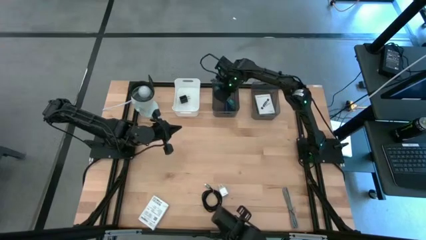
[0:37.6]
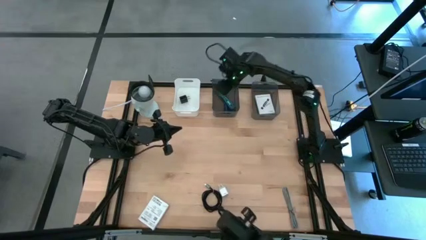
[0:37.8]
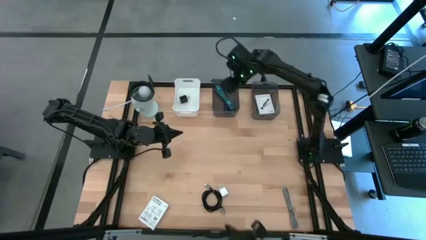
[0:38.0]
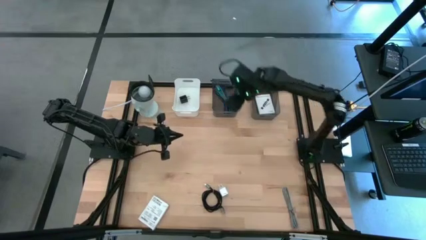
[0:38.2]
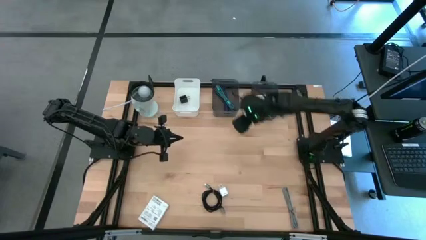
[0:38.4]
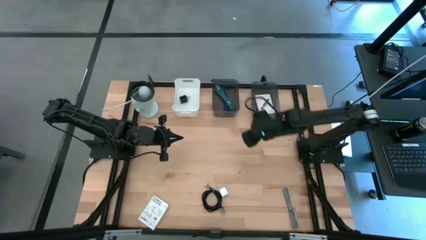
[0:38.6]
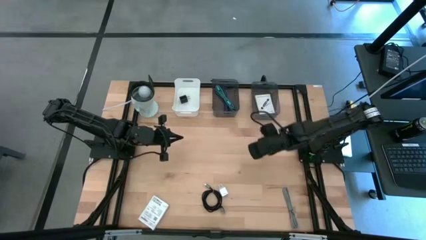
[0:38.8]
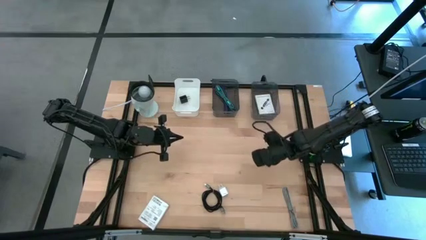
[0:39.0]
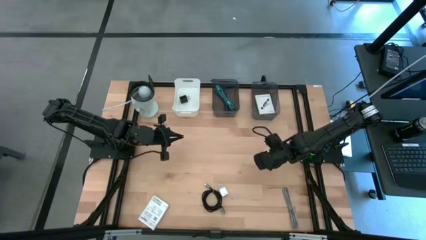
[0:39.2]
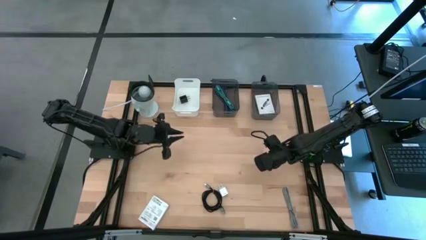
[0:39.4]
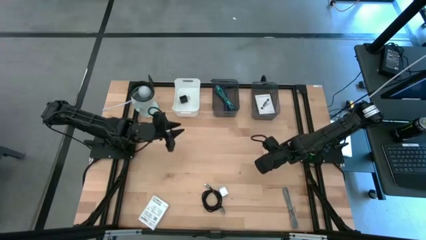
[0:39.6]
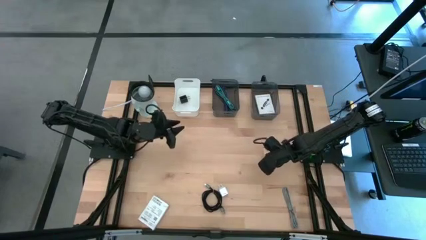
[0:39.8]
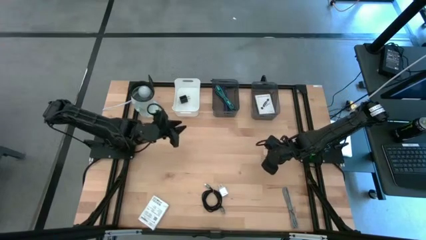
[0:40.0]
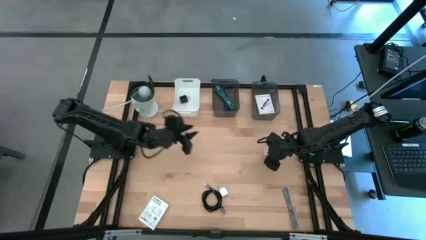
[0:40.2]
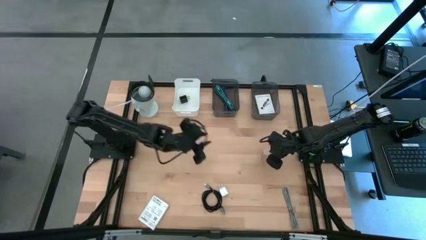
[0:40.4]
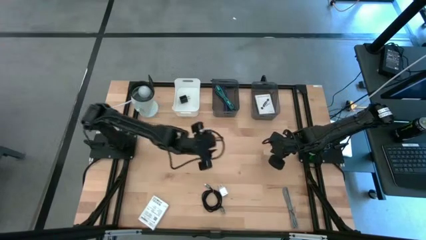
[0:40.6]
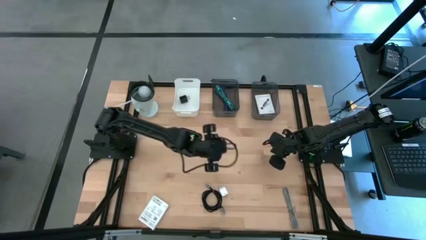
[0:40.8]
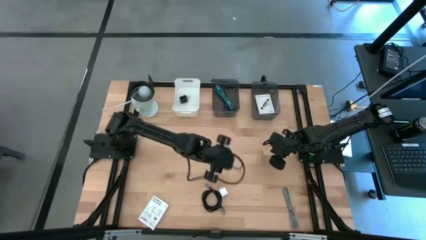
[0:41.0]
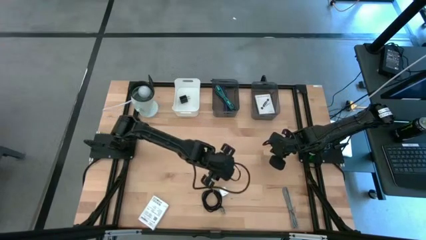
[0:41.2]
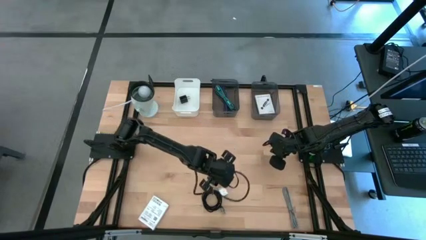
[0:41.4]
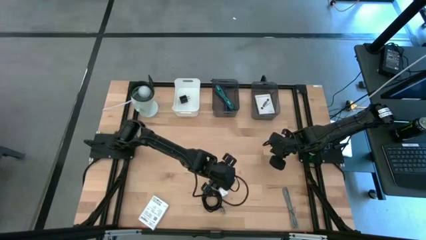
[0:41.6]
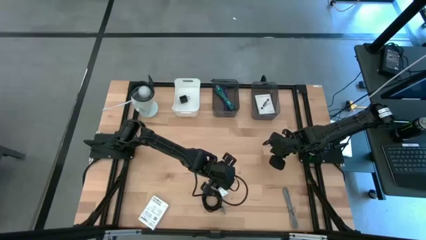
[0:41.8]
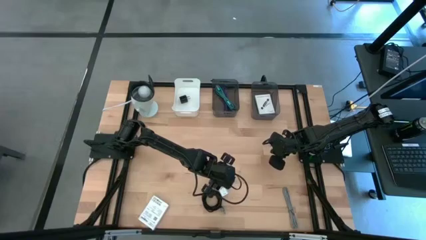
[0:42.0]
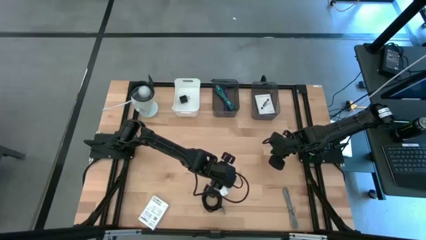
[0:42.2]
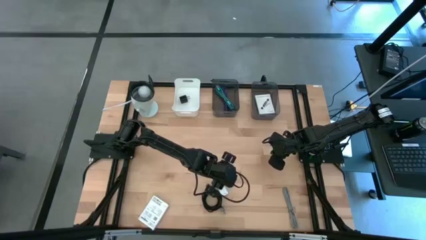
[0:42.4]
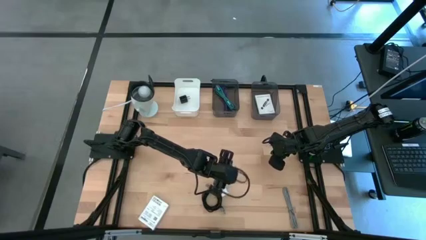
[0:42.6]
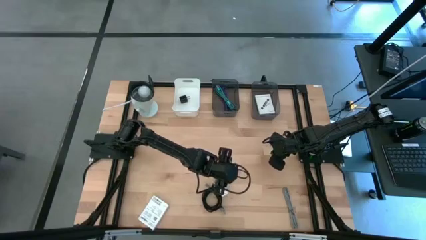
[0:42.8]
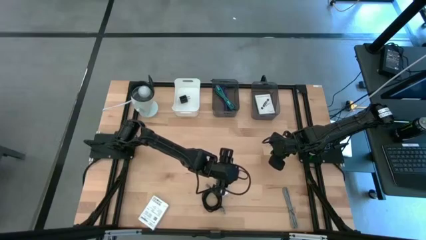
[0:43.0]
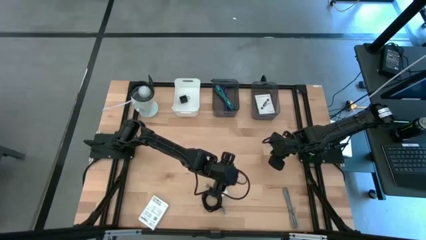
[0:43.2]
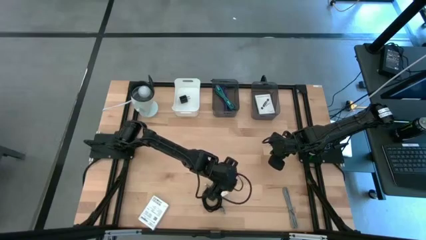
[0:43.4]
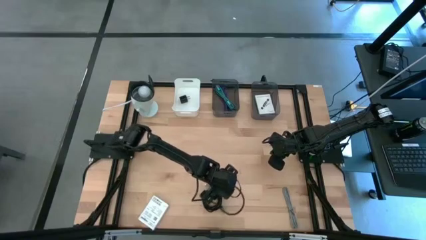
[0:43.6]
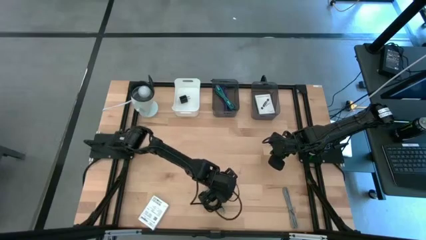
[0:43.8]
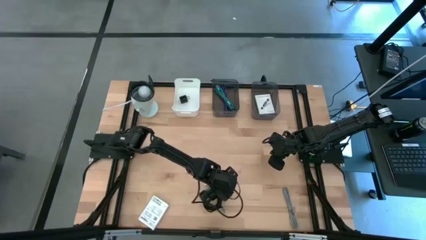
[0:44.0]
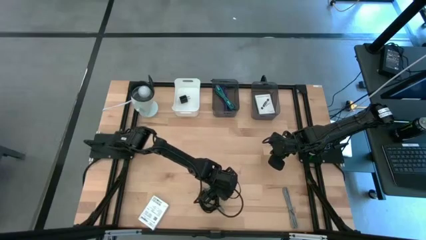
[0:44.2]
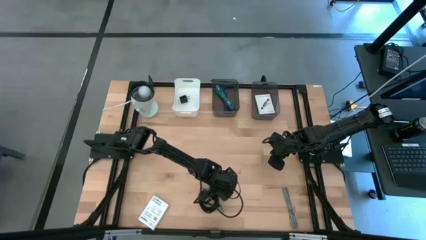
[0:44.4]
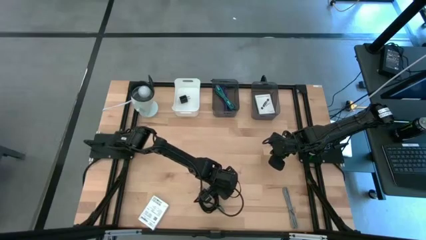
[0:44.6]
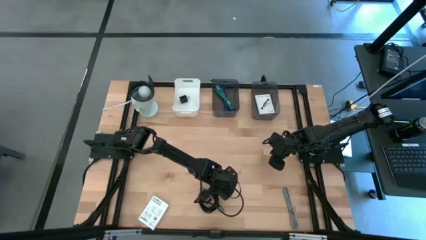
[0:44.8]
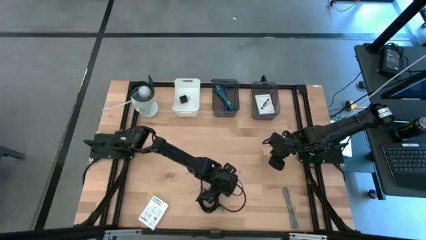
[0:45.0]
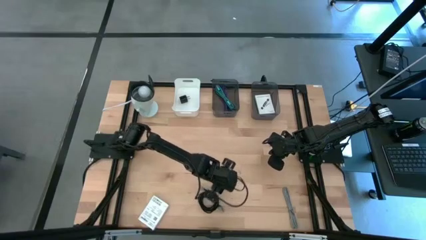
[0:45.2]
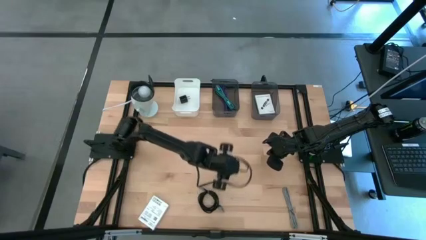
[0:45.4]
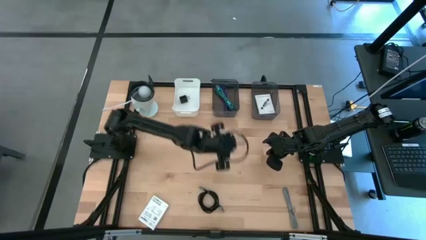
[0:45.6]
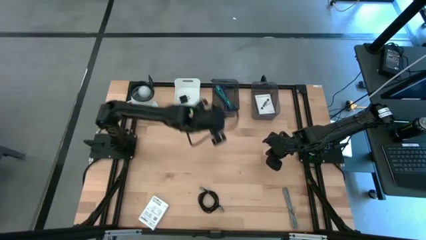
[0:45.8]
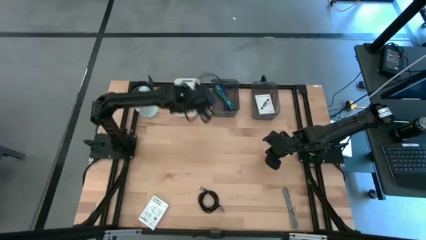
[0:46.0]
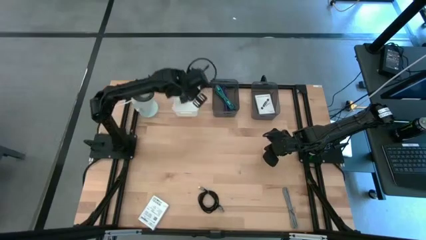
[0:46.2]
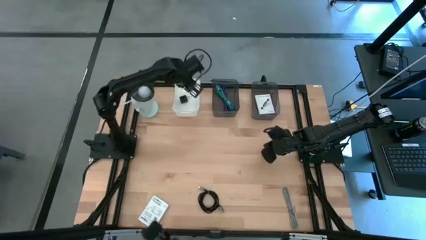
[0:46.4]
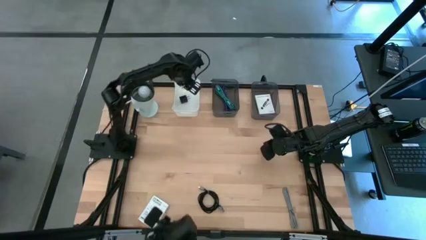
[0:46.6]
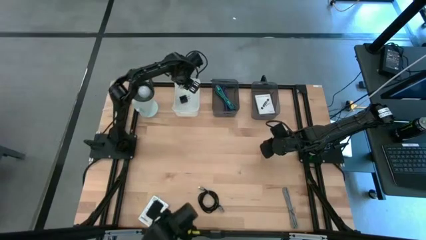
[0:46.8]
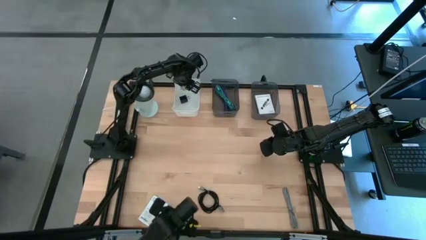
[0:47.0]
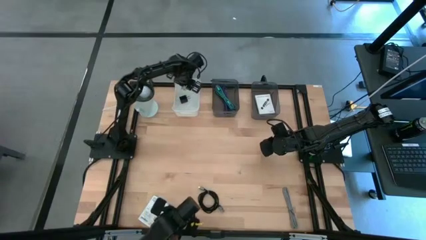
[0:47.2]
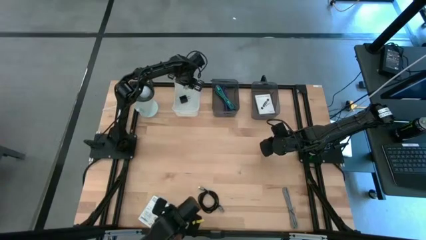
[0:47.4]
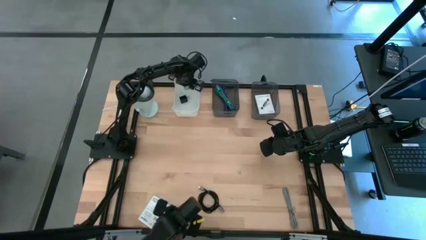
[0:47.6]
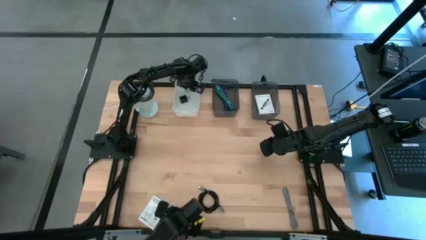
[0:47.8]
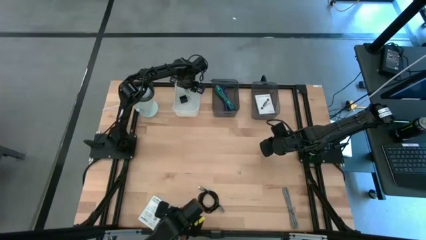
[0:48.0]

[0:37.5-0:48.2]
Task: Pick and place items into bin
Put the white charger adapter into the white bin

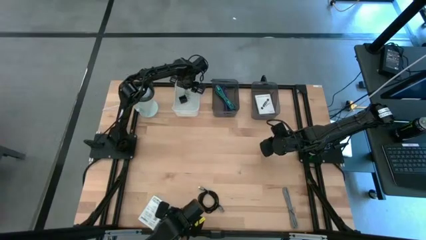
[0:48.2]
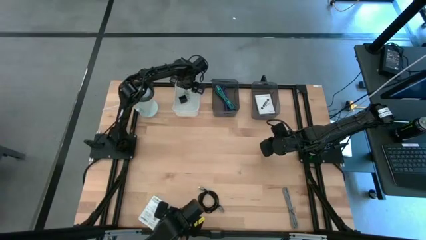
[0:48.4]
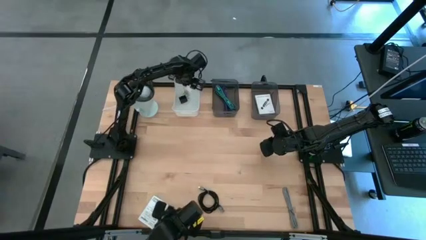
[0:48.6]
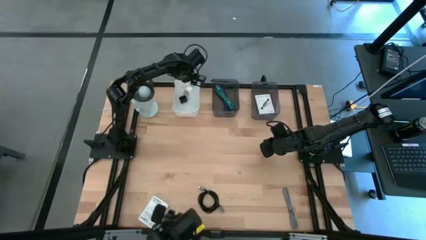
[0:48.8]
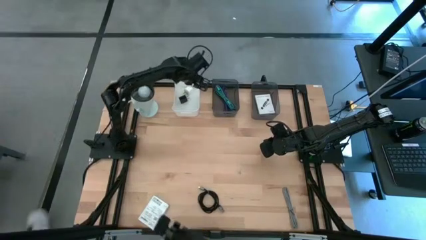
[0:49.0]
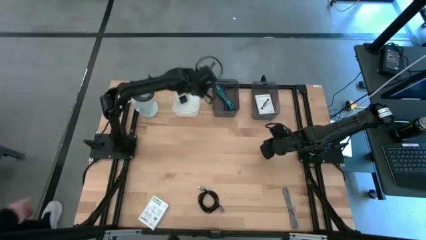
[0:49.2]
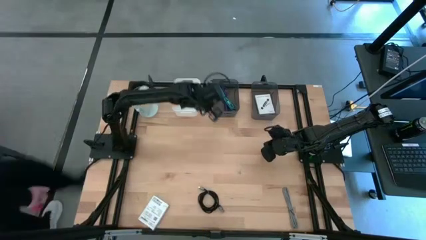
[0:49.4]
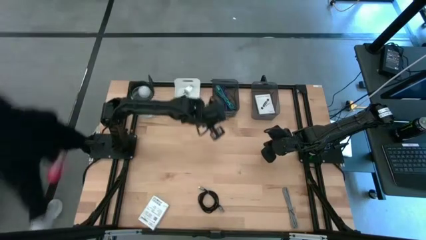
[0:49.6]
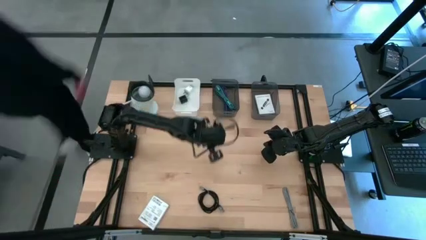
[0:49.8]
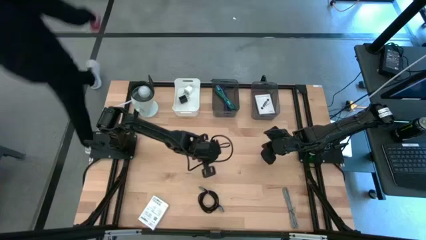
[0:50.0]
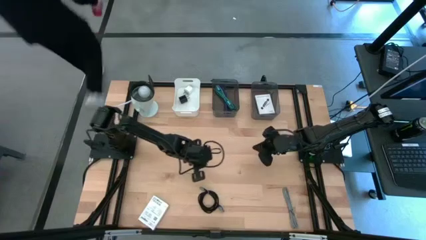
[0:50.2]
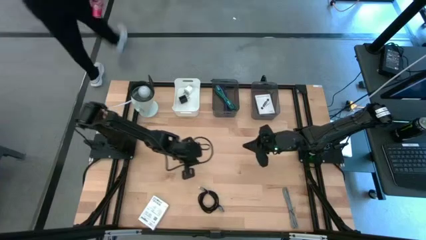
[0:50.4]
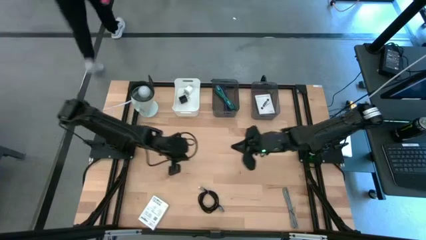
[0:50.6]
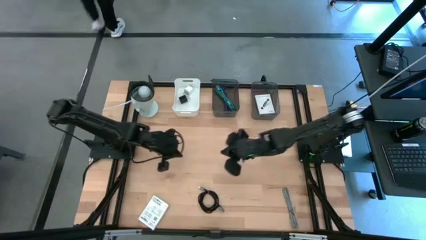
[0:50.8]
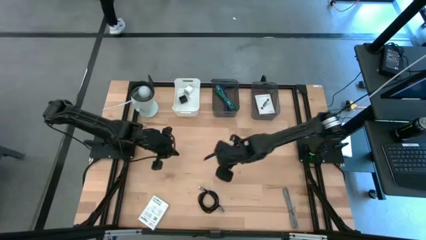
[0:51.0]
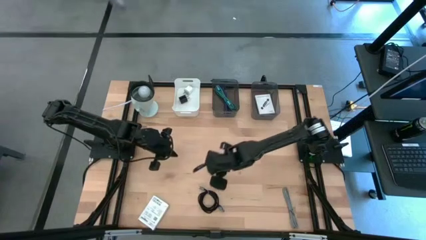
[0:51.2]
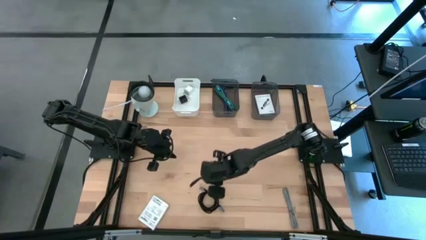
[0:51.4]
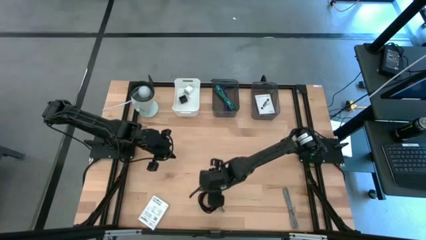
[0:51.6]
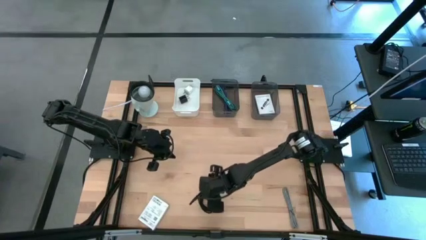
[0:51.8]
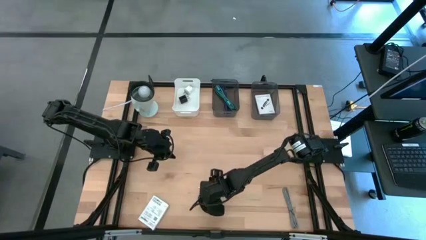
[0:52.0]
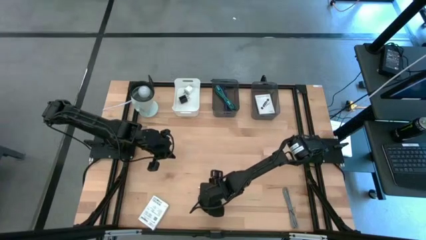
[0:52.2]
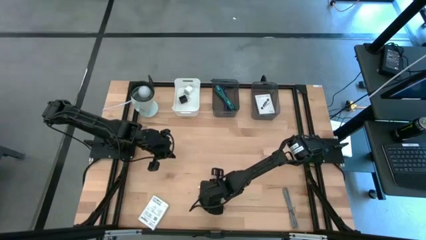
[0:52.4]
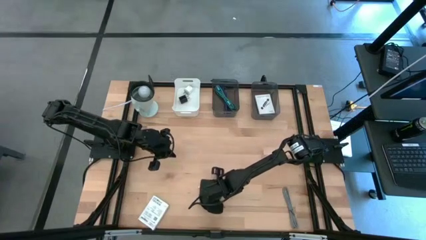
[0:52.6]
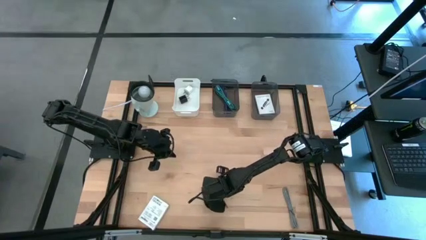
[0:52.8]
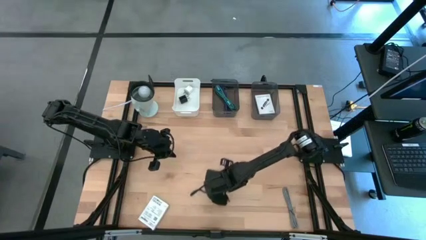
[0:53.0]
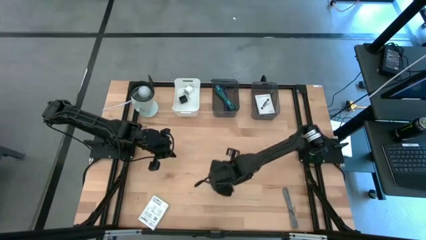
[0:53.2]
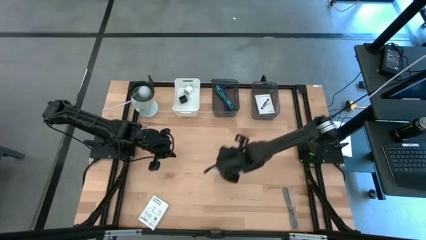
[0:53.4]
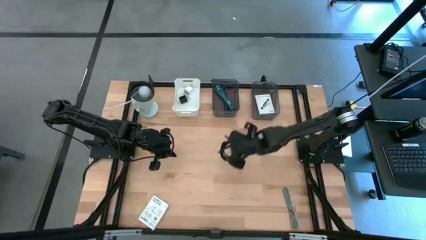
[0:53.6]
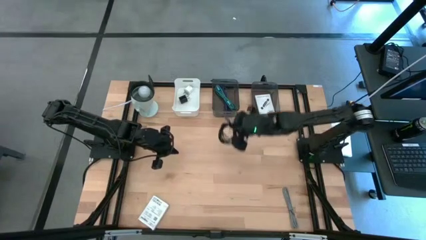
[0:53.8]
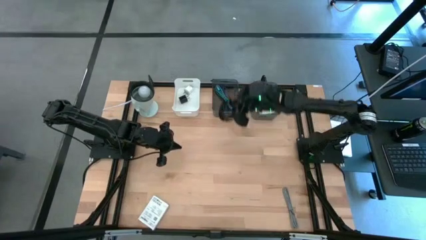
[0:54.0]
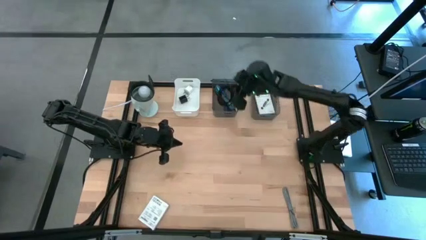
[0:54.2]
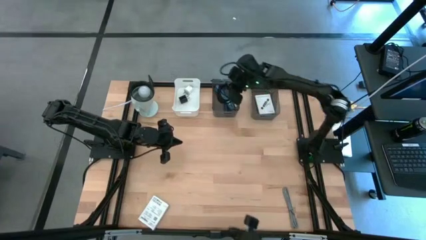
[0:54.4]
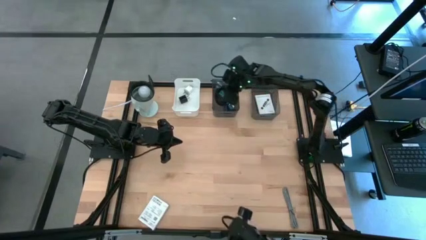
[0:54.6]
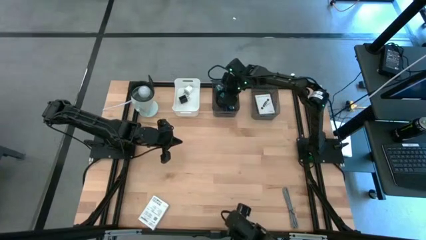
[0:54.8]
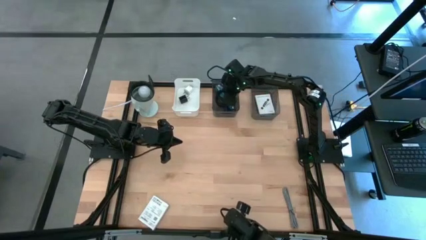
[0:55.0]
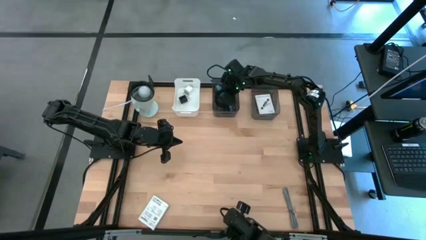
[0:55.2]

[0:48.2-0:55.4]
Put the black charger cable into the left black bin
